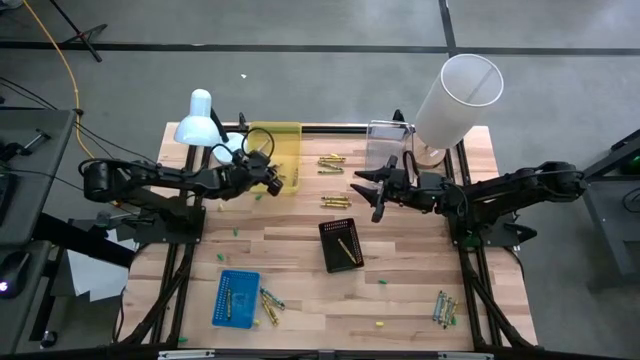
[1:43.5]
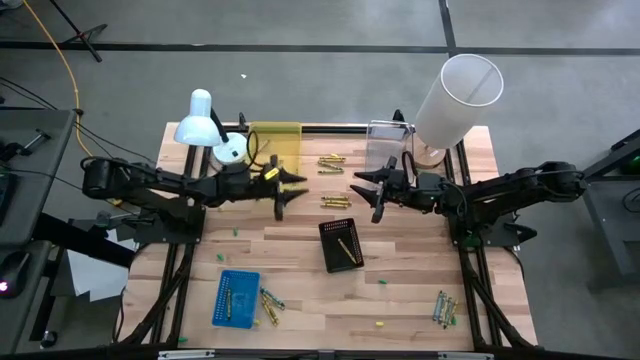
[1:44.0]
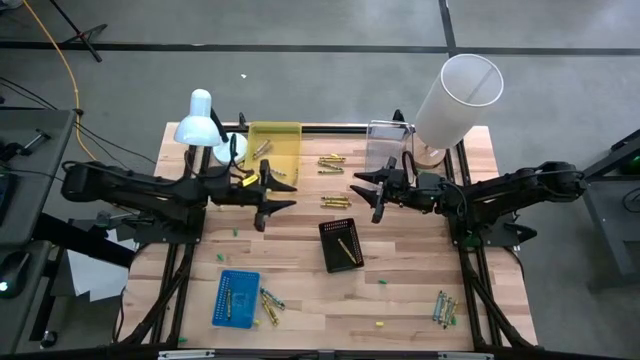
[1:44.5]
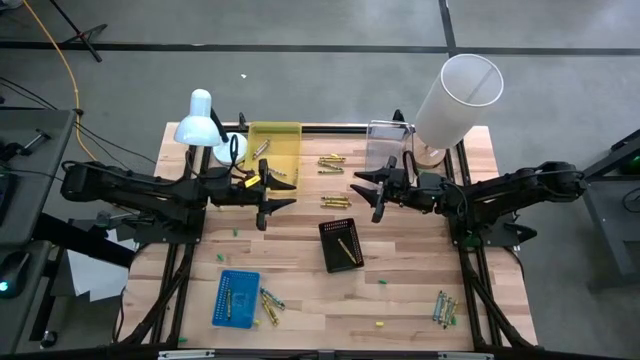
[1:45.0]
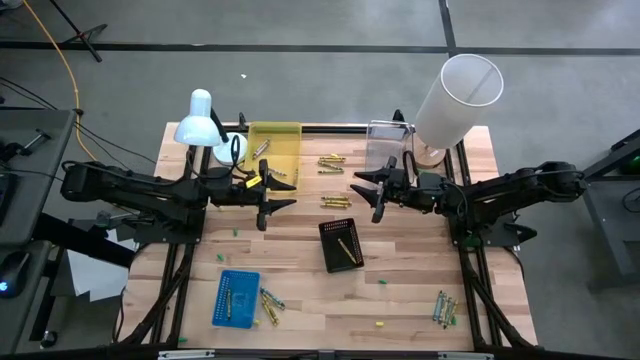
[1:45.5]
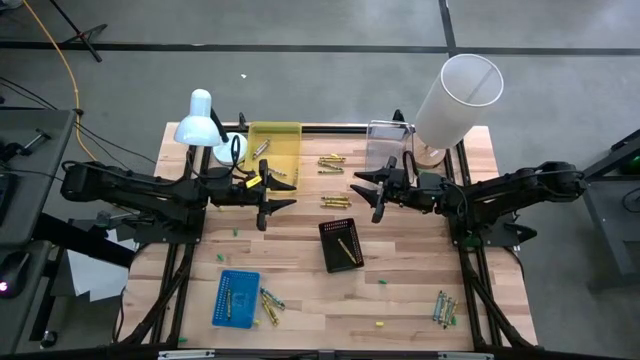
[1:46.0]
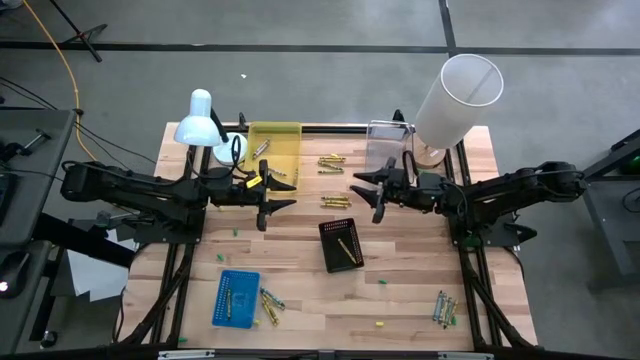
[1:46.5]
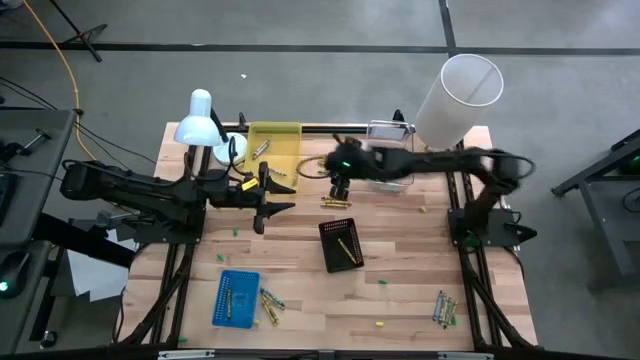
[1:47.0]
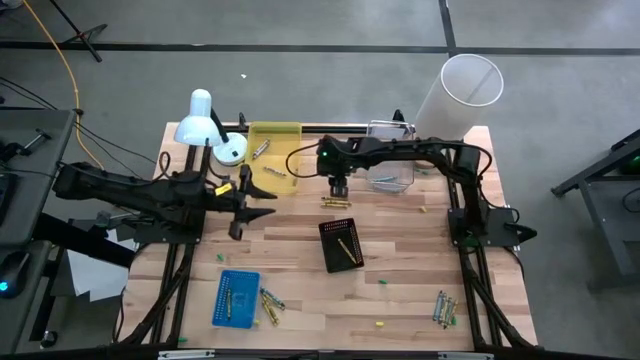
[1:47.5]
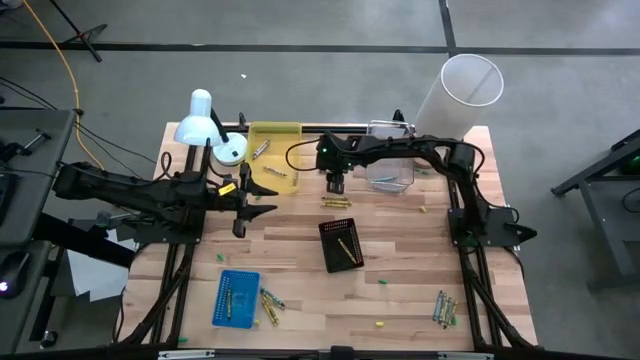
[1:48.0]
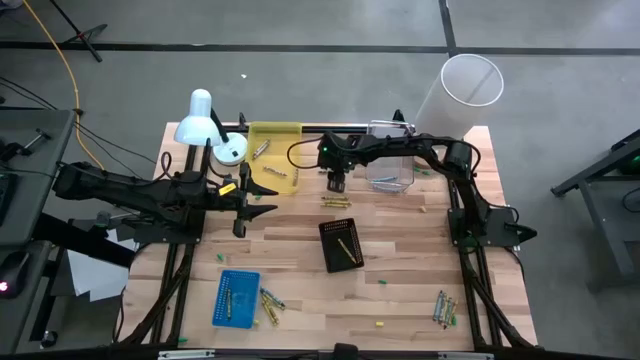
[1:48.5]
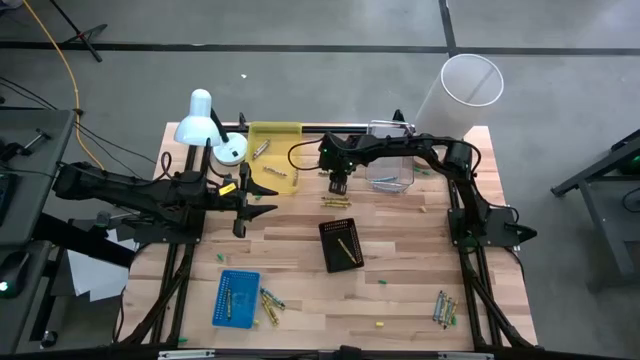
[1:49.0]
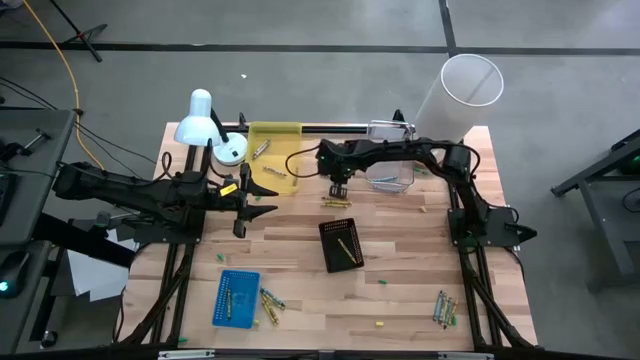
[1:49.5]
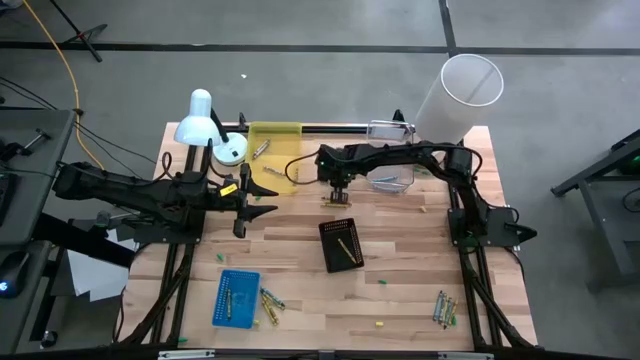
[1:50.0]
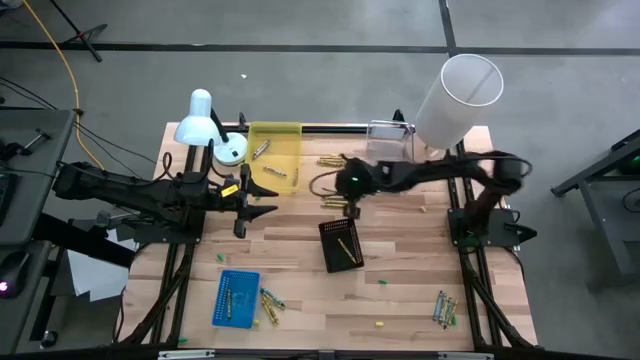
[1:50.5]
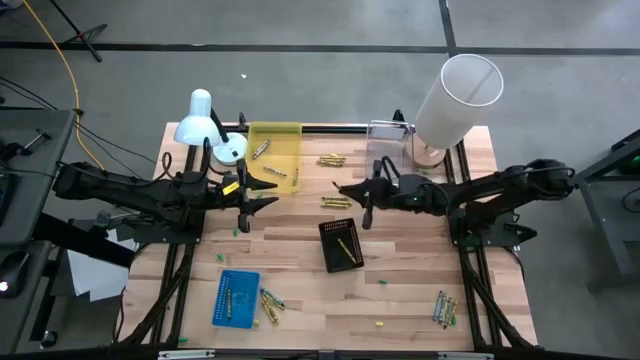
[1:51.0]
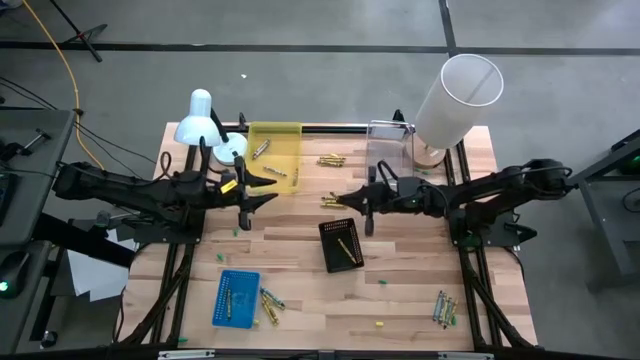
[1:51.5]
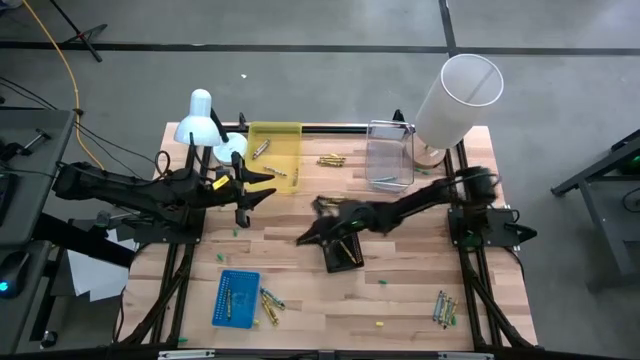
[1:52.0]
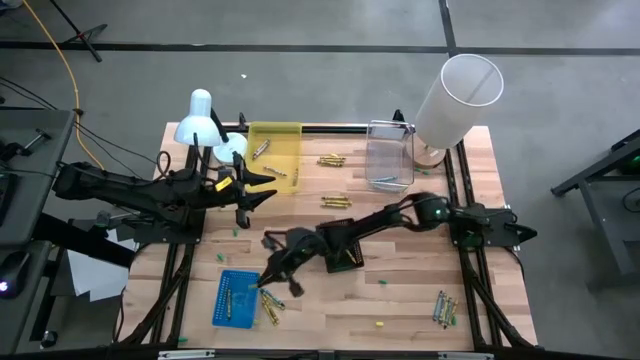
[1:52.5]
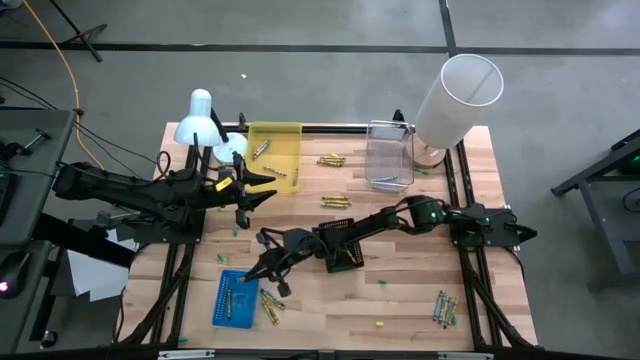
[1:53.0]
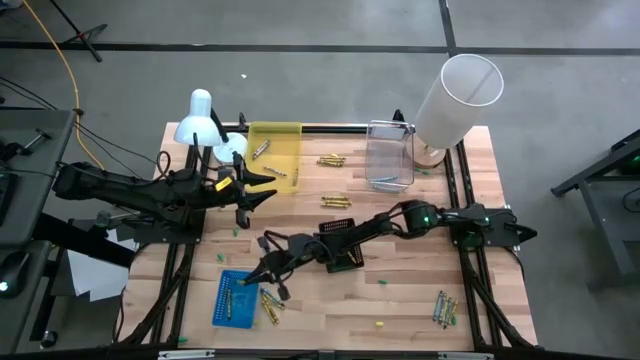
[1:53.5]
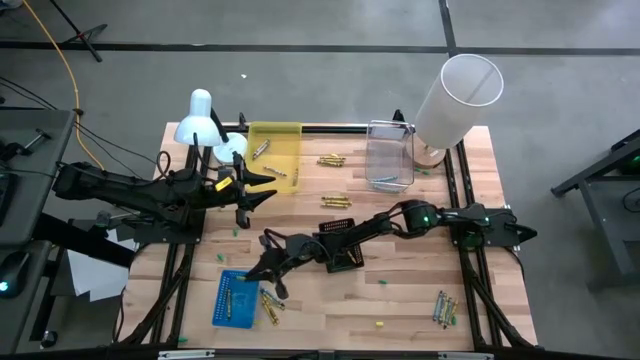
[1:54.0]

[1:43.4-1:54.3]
Task: Sort crayons
Put the green crayon into the blue bin

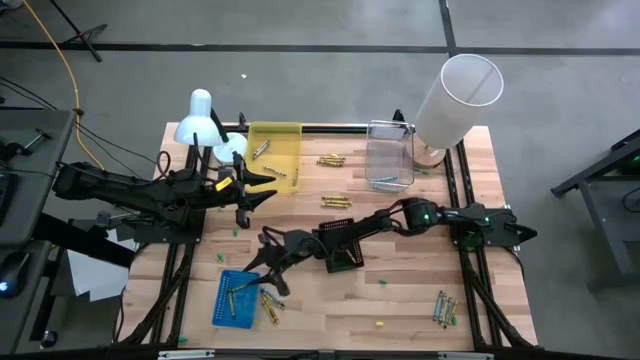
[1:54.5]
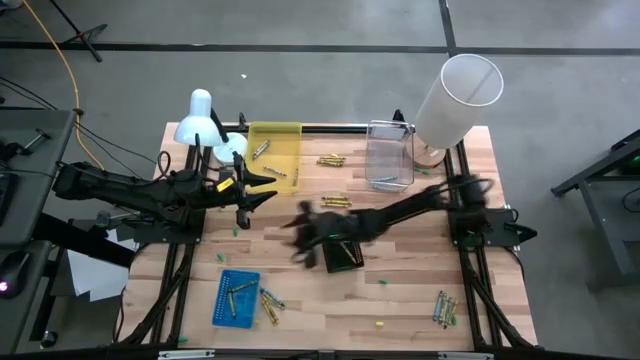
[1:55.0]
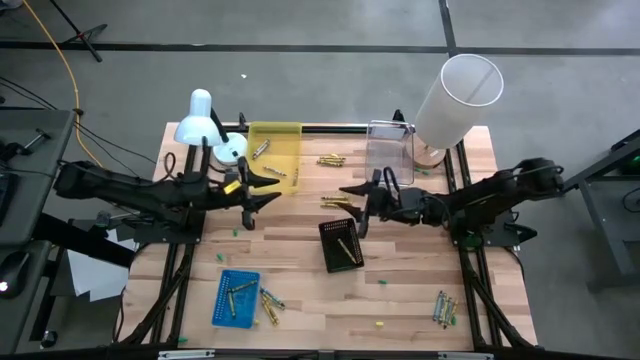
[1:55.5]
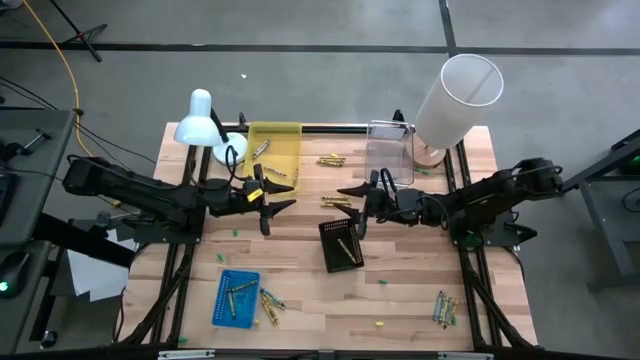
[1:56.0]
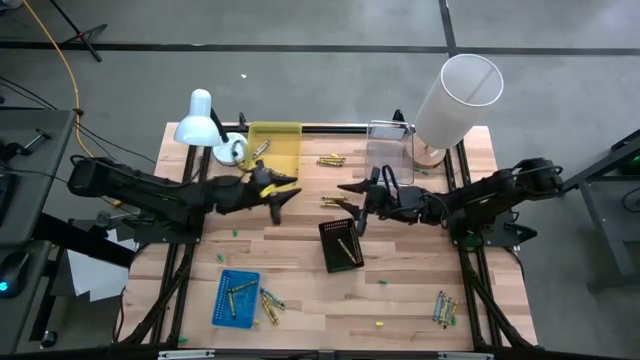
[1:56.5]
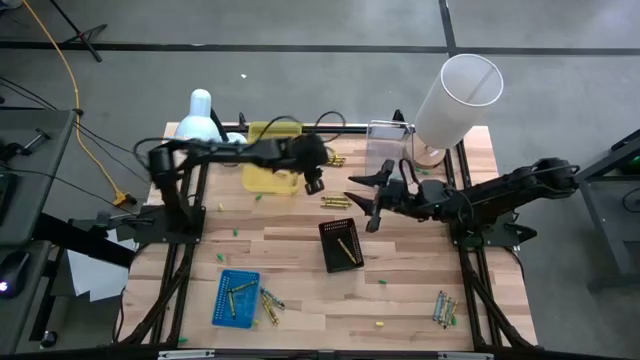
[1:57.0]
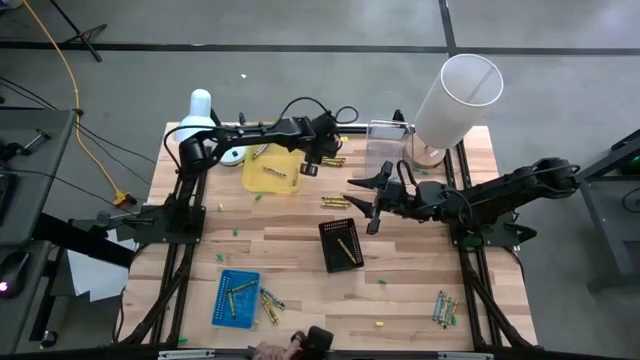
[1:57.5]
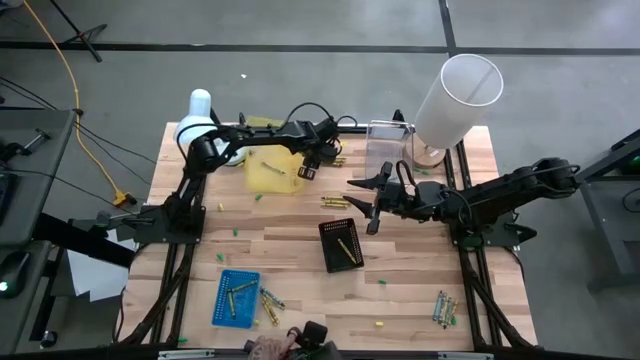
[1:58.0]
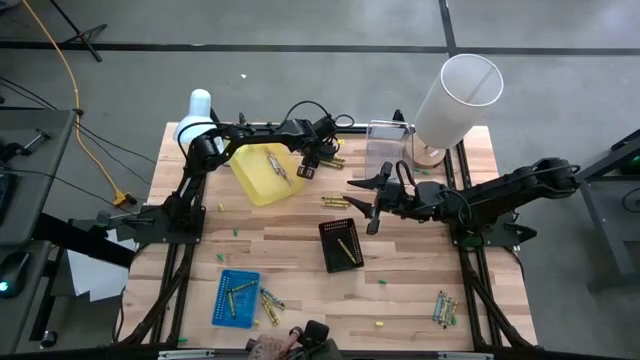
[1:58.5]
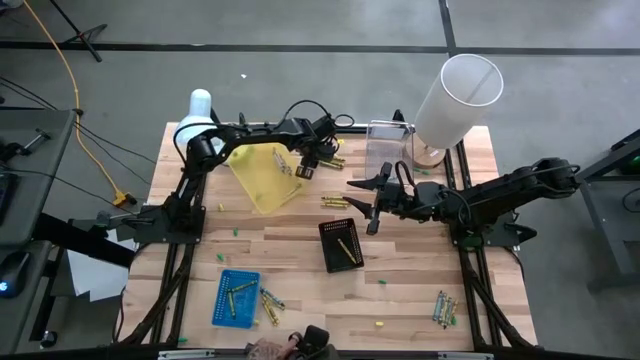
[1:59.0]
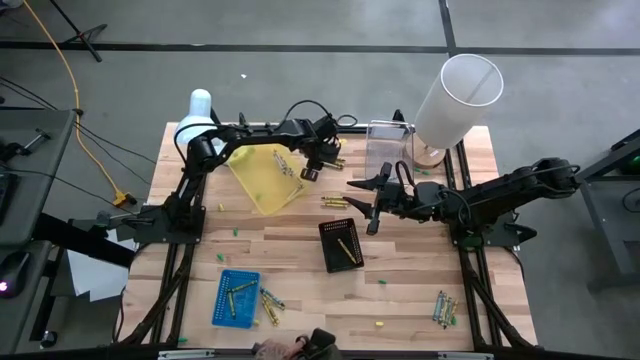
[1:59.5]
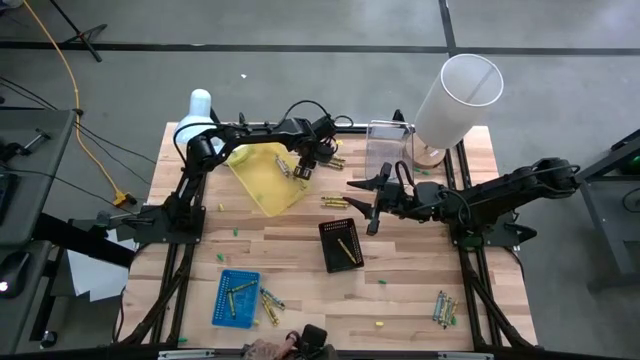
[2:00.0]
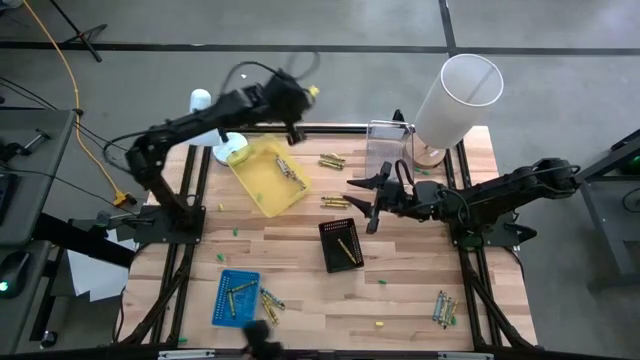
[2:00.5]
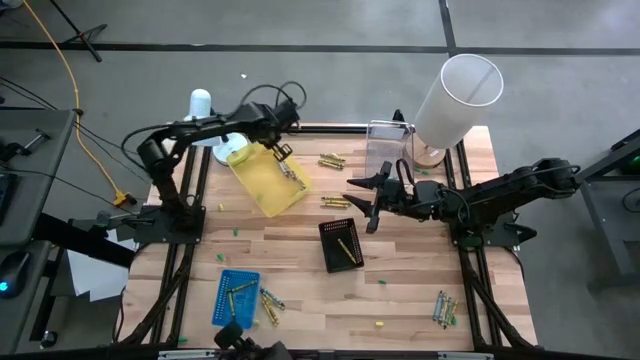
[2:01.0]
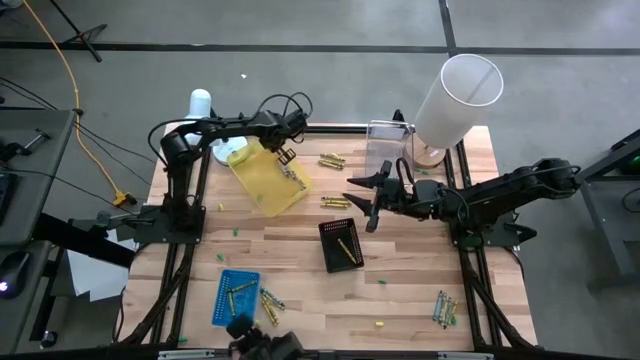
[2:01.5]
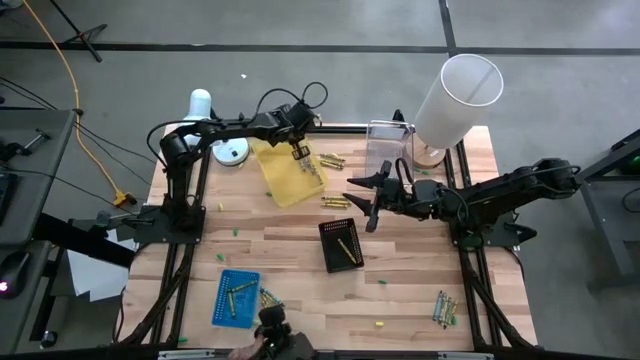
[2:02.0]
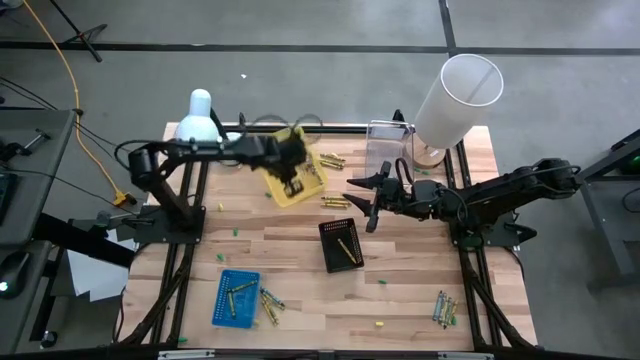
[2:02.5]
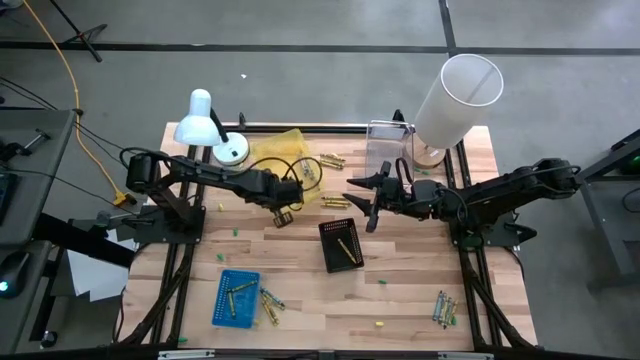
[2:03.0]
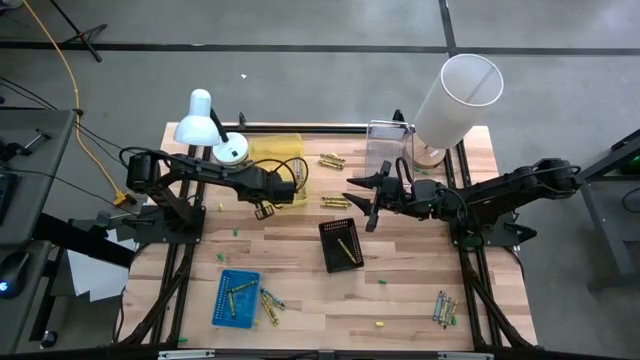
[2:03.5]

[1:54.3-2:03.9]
Adjust the yellow bin

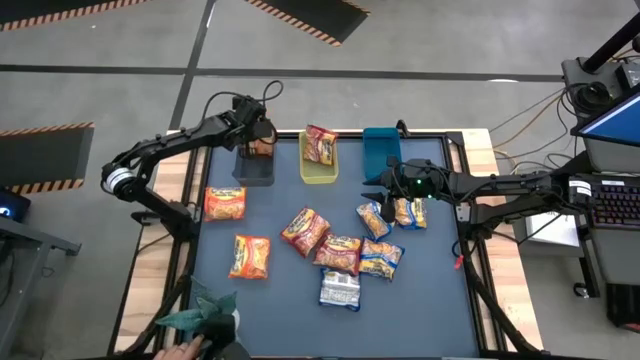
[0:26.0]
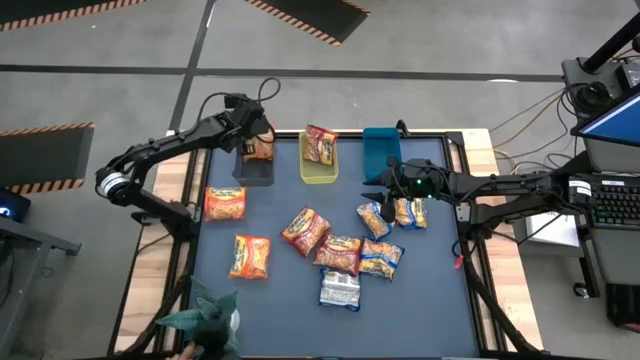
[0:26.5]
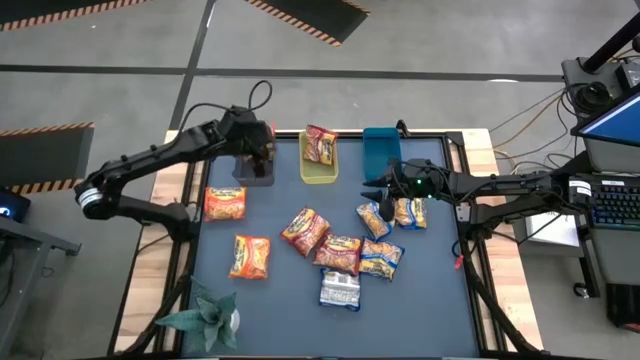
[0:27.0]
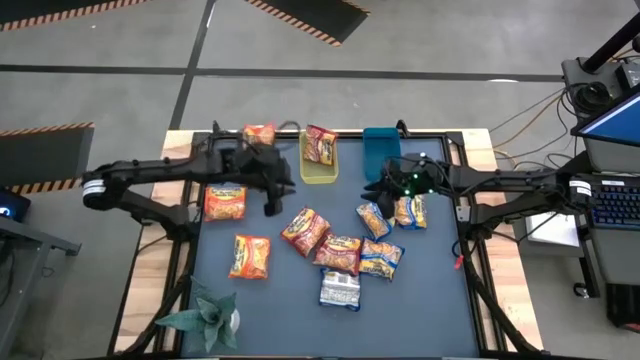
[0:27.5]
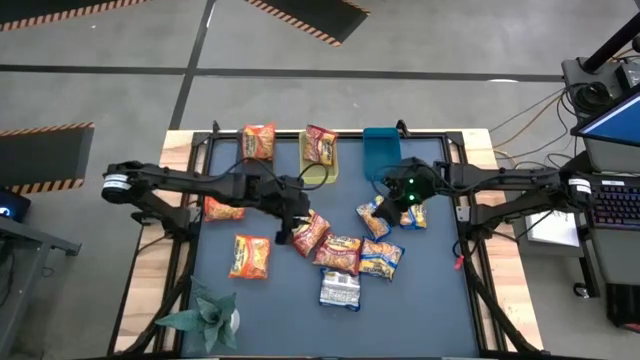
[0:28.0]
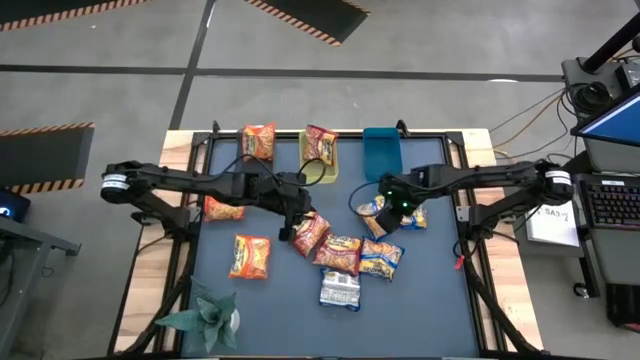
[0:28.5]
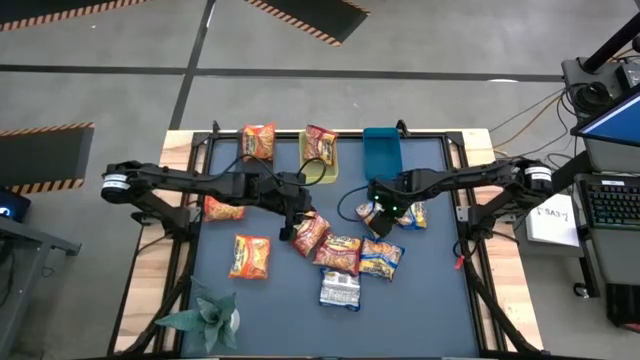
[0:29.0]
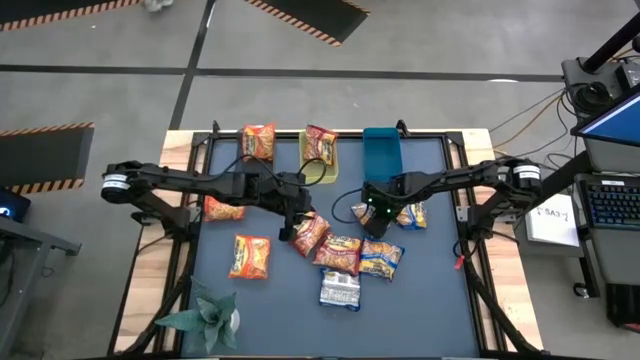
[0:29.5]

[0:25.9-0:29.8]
Task: Sort Maruchan noodles
Put the blue noodle pack into the blue bin
